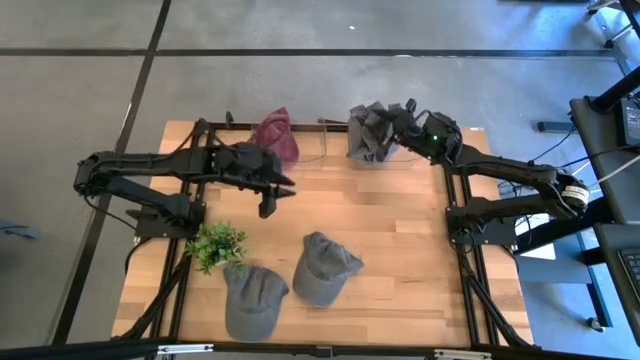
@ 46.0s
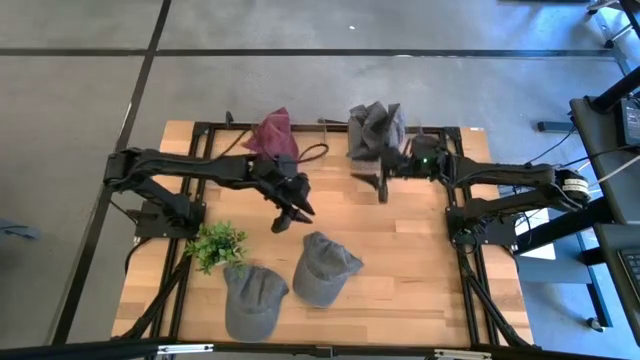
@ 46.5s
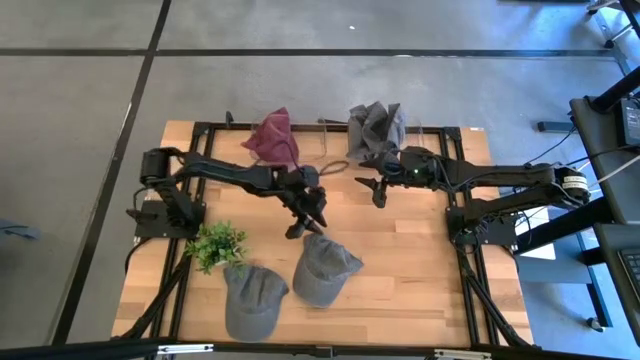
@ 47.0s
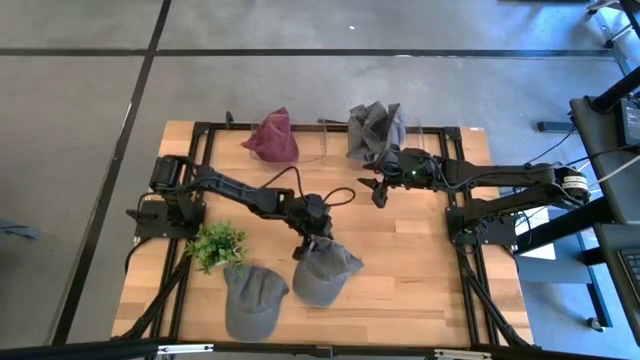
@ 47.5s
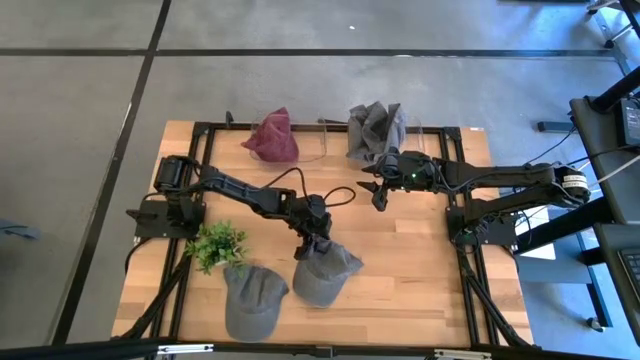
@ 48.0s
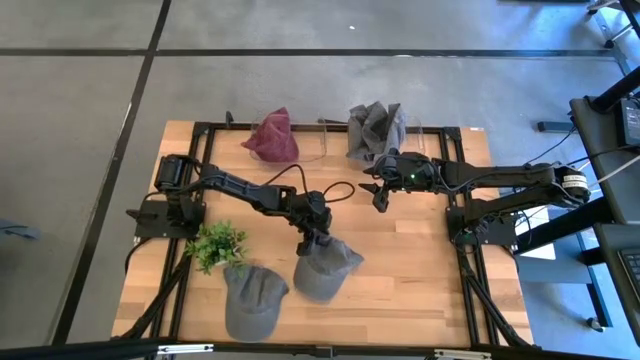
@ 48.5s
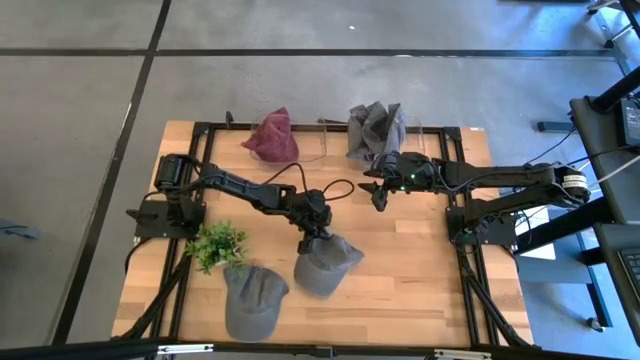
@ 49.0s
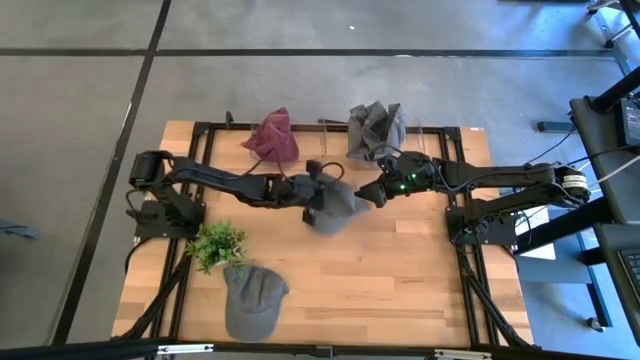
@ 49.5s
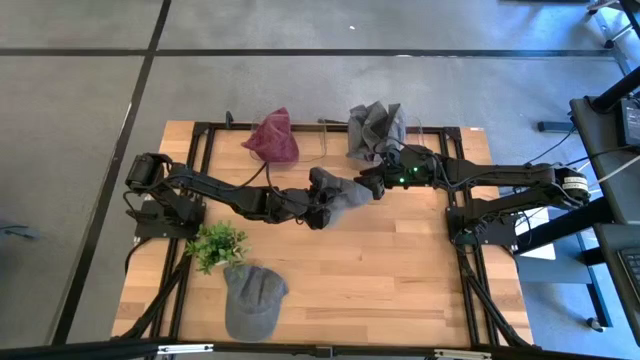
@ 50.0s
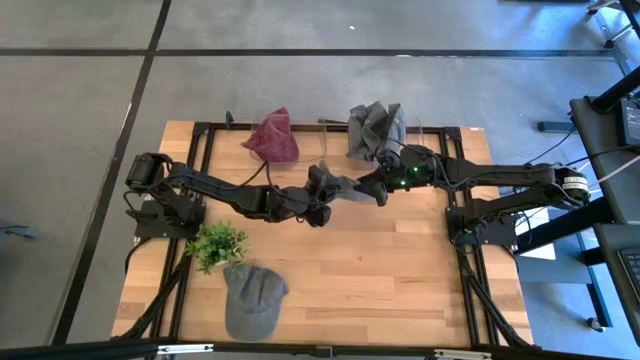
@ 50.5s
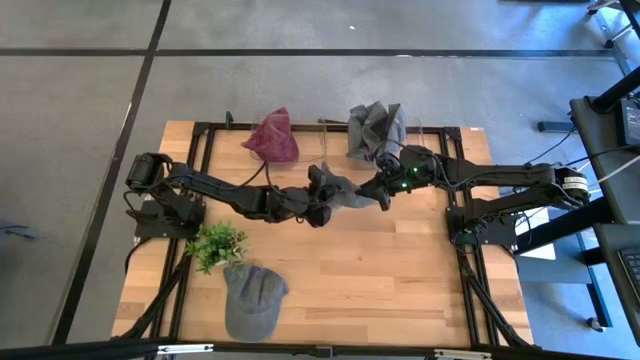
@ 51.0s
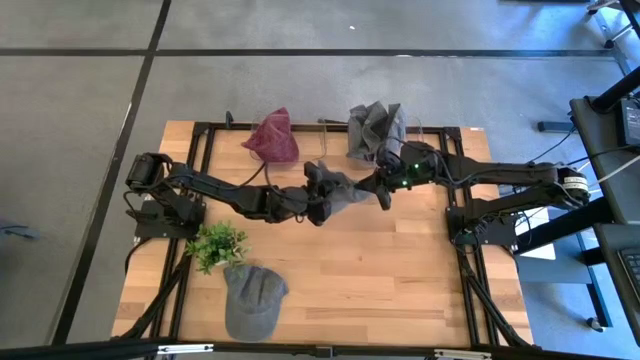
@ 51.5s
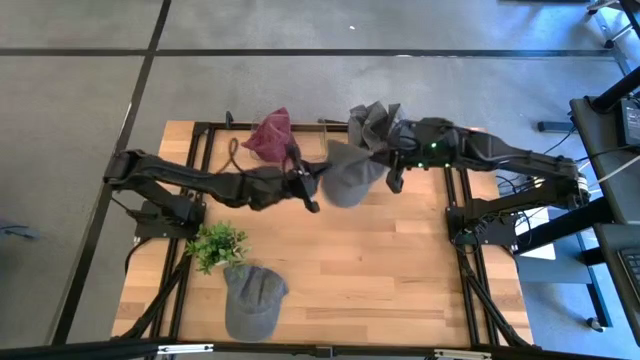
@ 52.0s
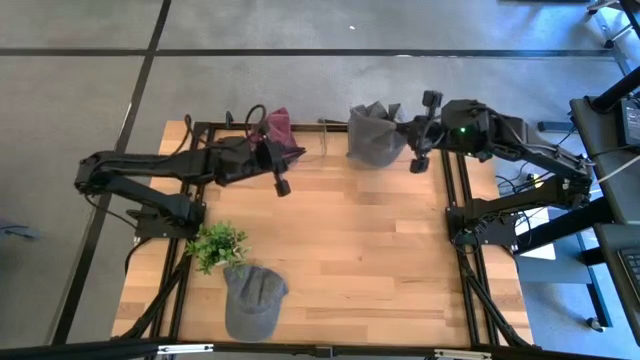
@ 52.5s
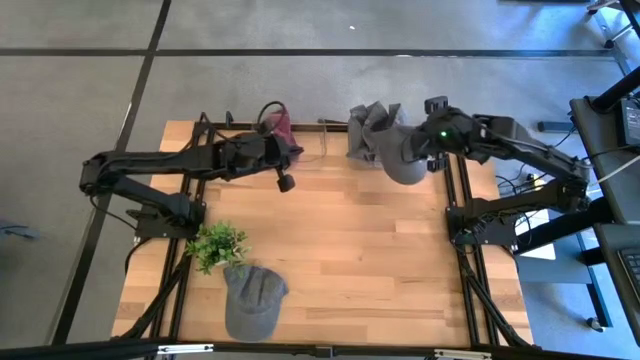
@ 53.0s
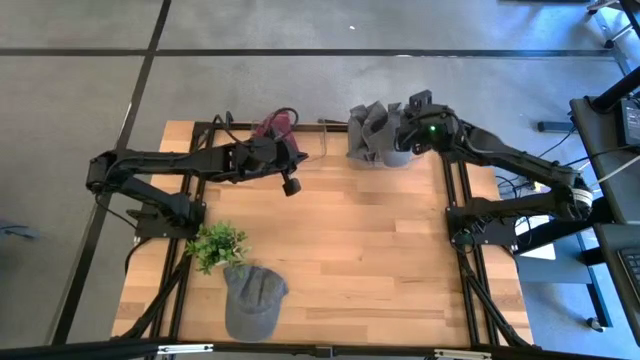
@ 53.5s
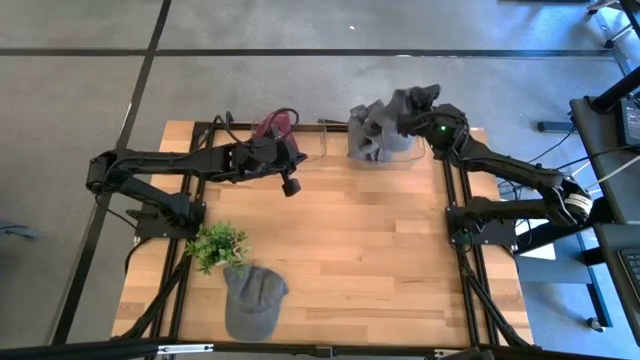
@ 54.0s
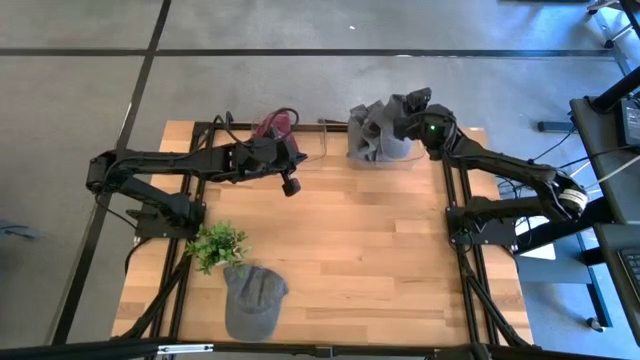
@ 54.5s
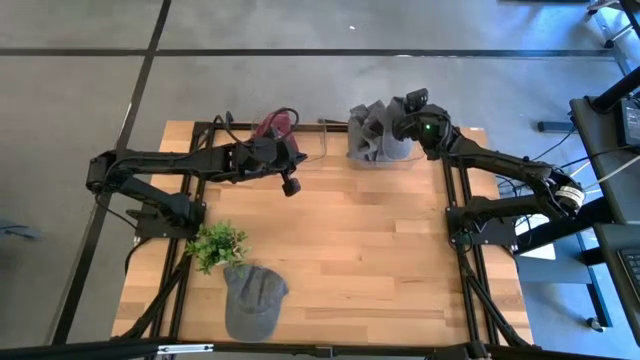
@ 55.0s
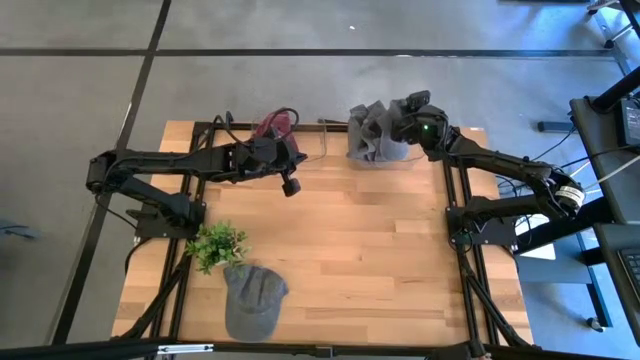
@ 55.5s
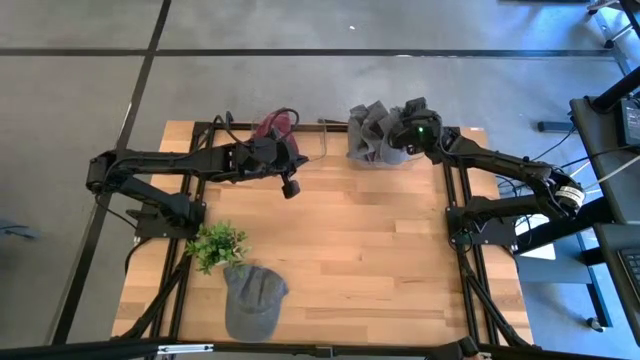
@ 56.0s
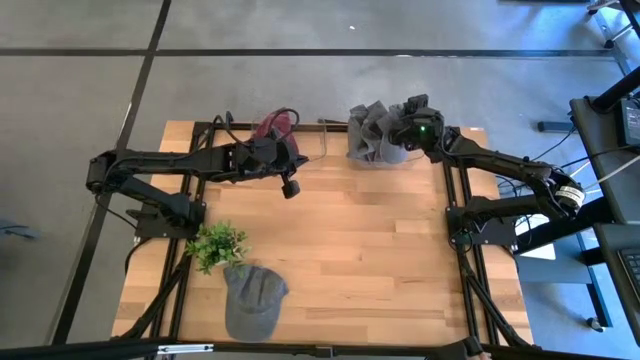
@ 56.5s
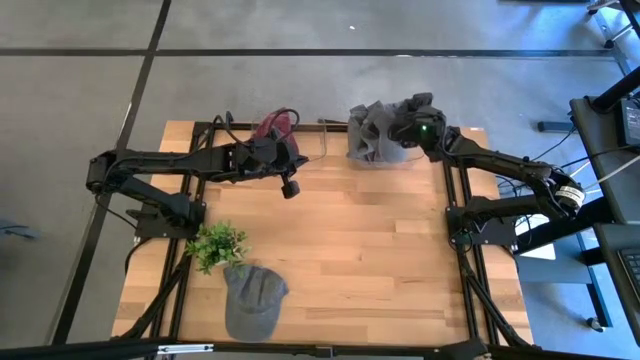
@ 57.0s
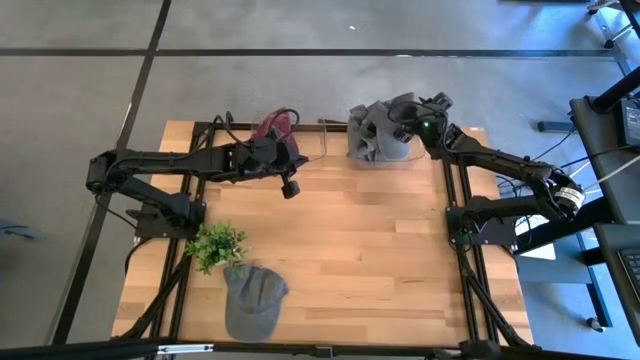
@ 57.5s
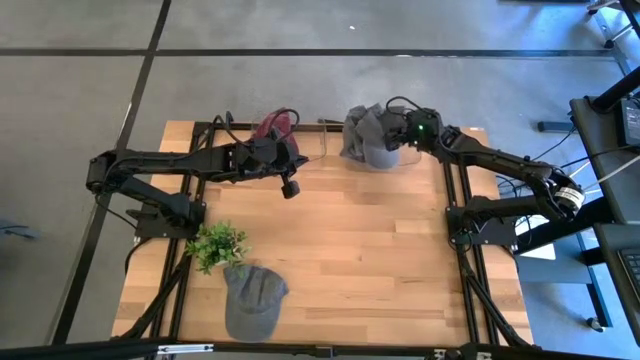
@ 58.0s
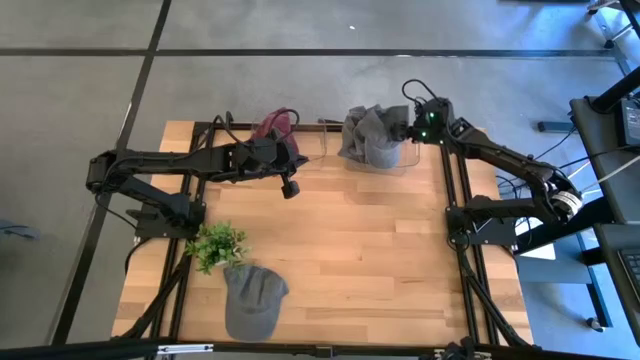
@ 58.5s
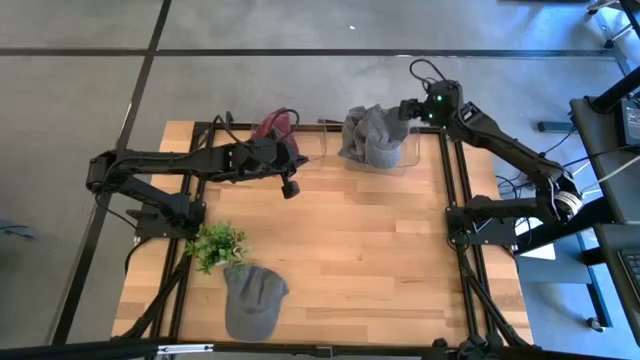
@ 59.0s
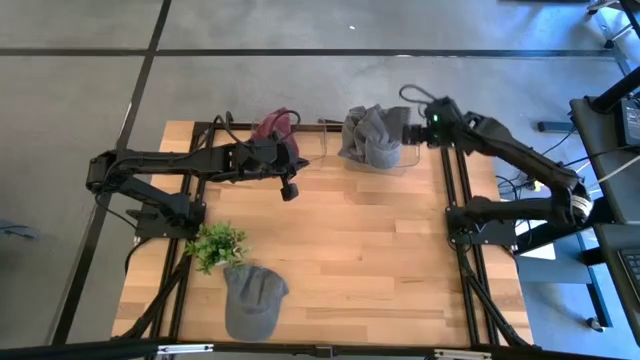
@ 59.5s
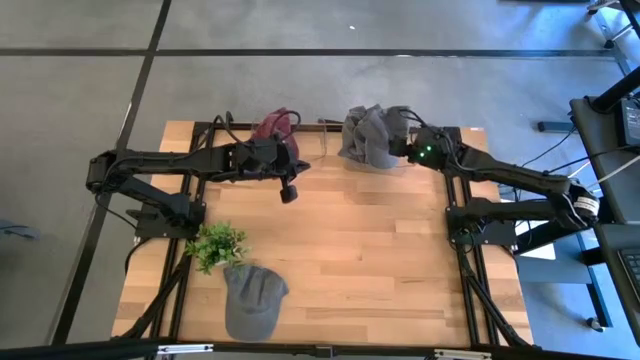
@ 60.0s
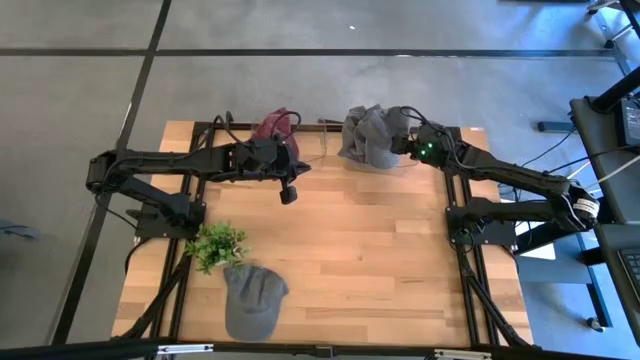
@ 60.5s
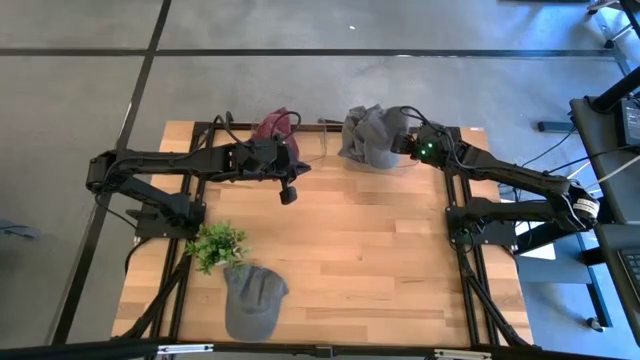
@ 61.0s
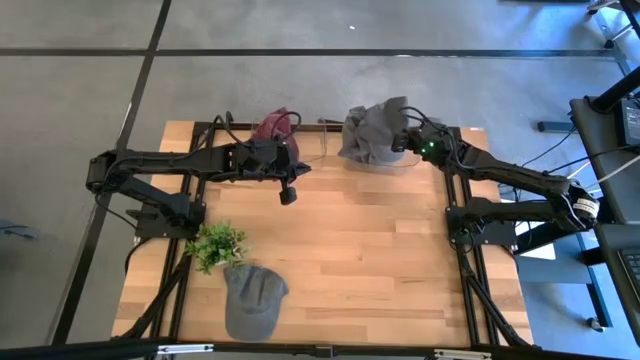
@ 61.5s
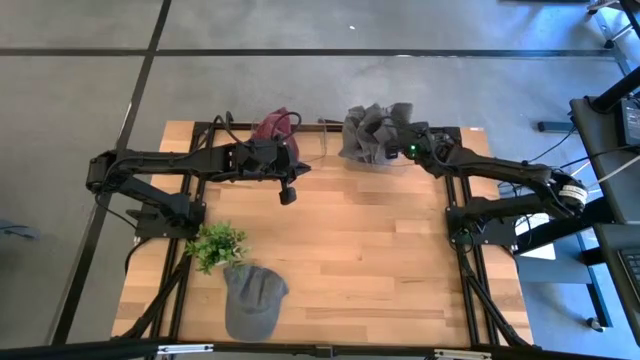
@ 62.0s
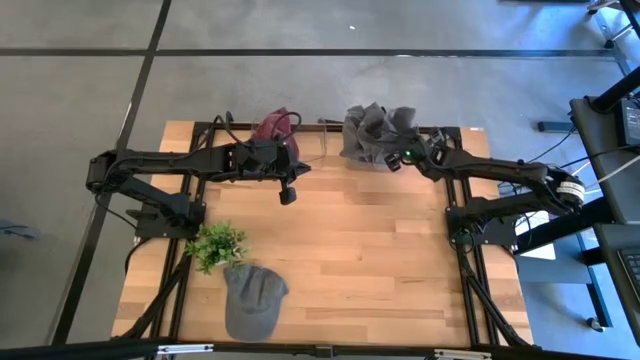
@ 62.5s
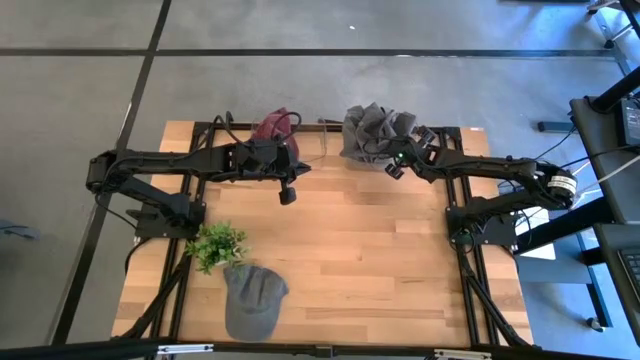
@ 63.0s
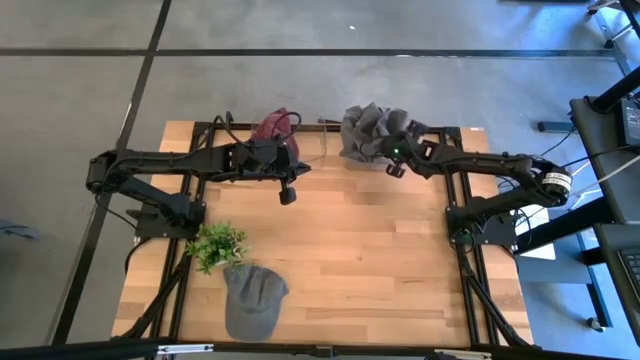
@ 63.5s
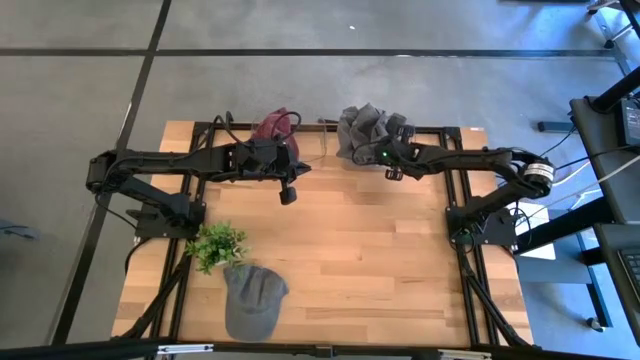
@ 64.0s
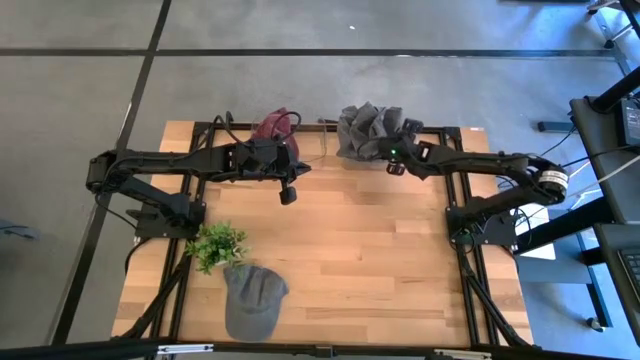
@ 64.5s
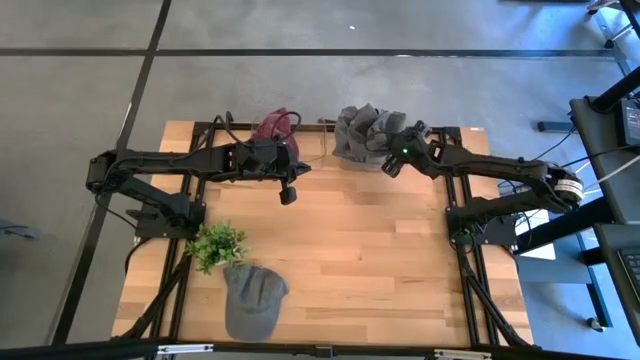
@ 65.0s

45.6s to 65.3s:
Task: Pick & Place hat
Put the gray cap into the right transparent bin
